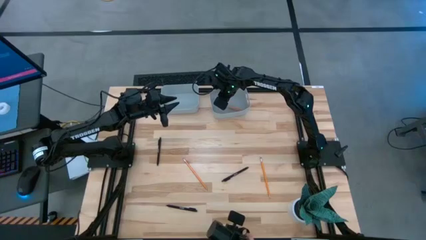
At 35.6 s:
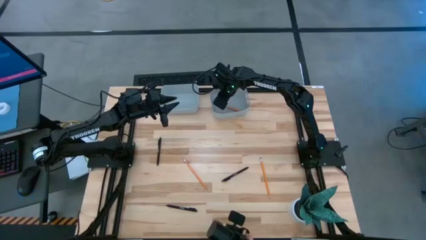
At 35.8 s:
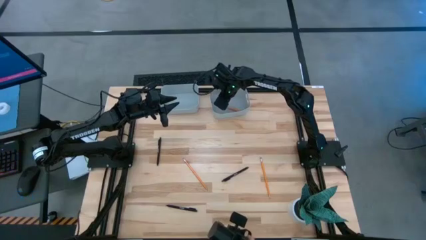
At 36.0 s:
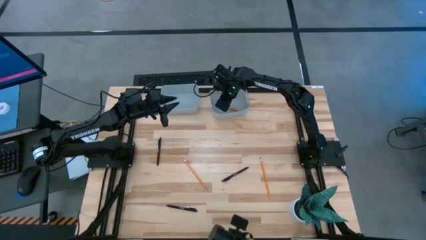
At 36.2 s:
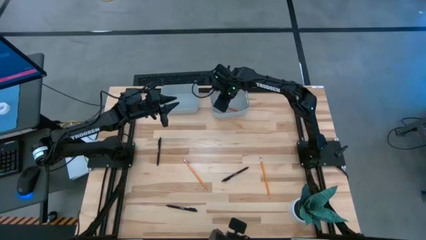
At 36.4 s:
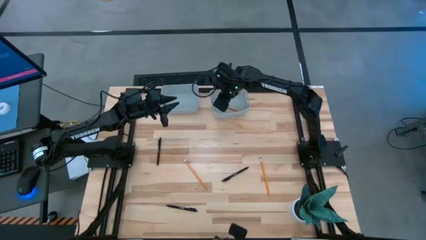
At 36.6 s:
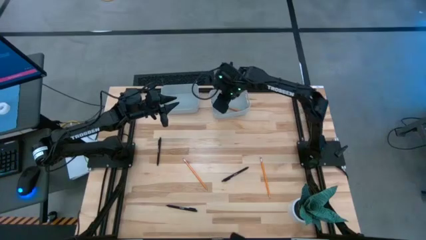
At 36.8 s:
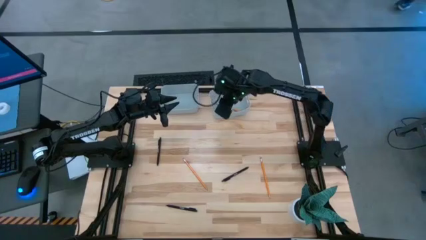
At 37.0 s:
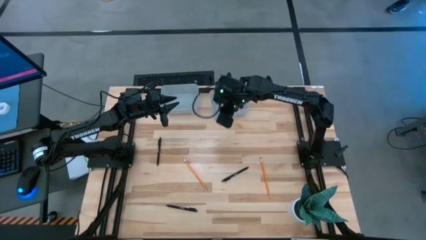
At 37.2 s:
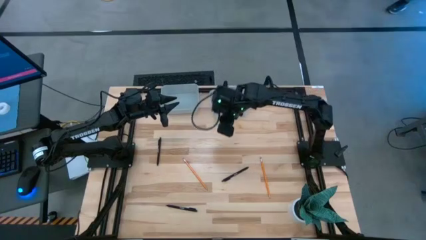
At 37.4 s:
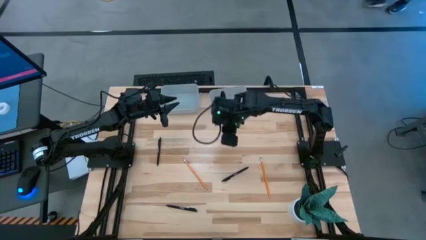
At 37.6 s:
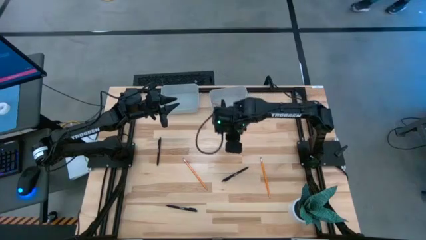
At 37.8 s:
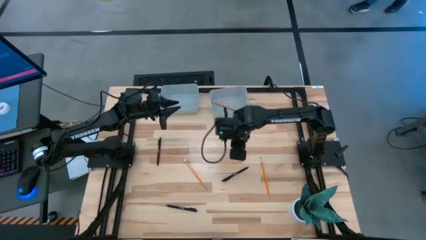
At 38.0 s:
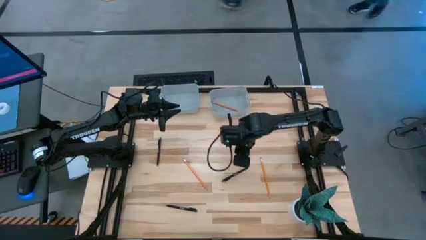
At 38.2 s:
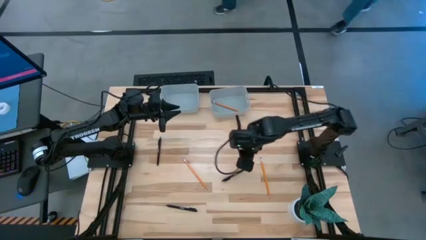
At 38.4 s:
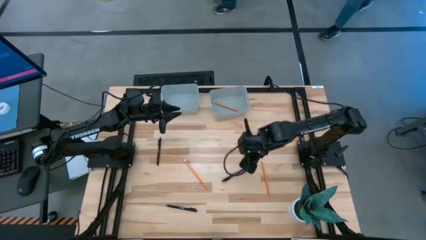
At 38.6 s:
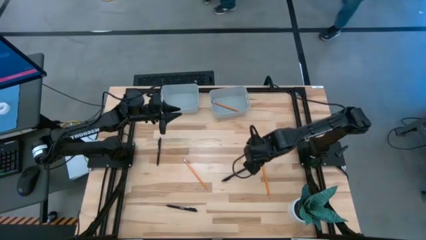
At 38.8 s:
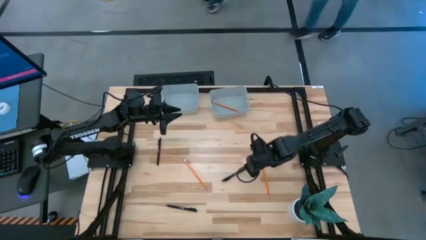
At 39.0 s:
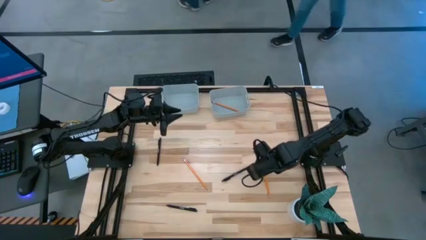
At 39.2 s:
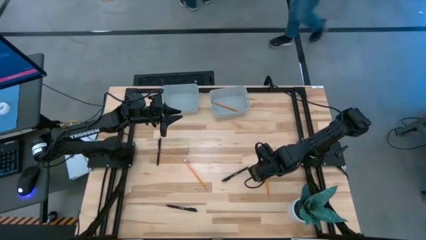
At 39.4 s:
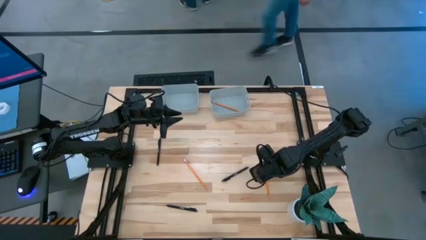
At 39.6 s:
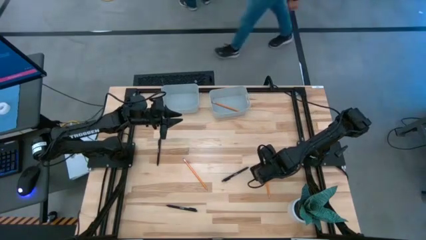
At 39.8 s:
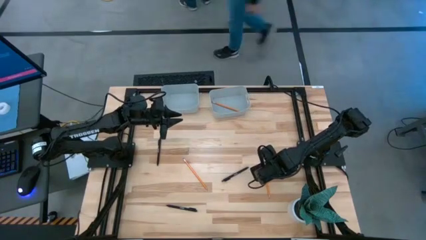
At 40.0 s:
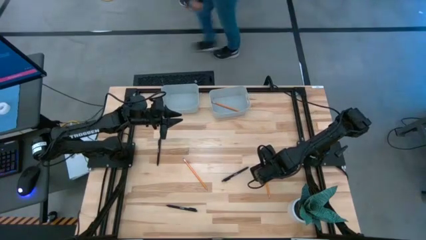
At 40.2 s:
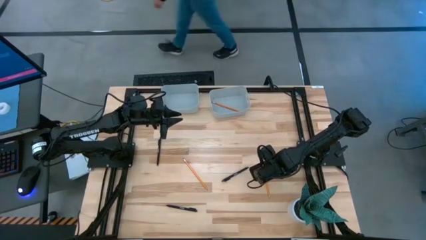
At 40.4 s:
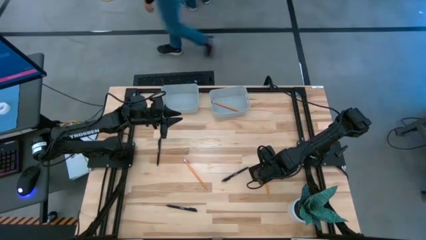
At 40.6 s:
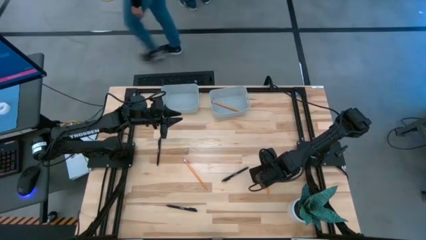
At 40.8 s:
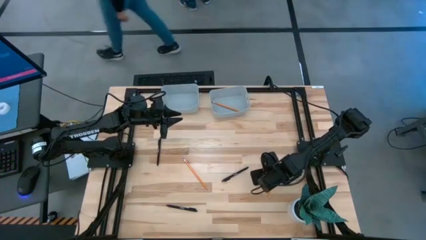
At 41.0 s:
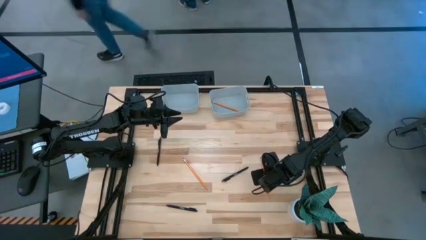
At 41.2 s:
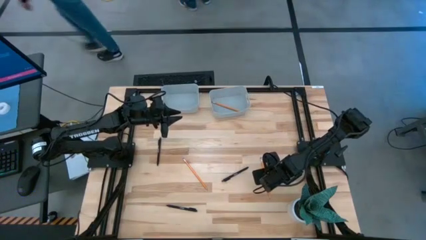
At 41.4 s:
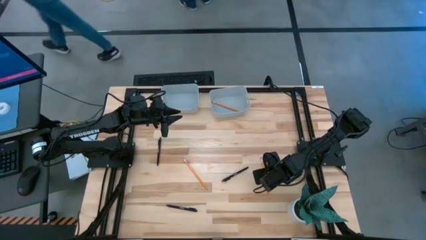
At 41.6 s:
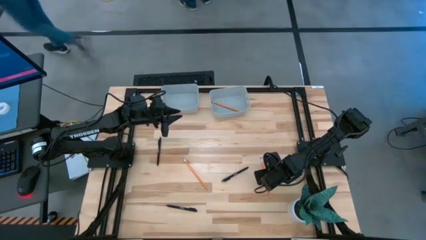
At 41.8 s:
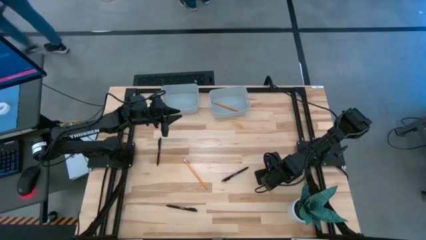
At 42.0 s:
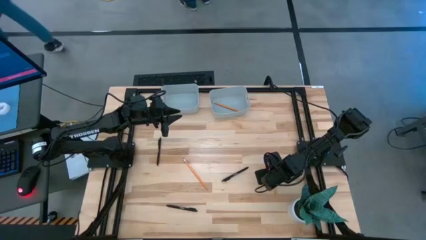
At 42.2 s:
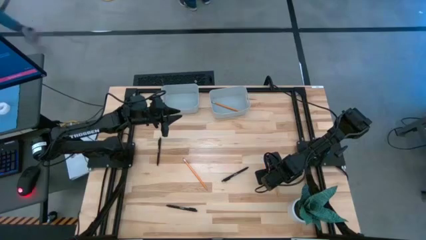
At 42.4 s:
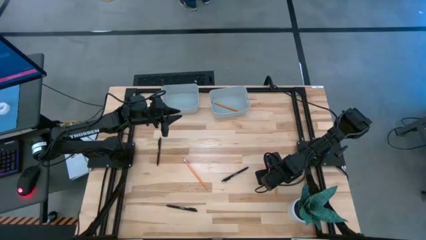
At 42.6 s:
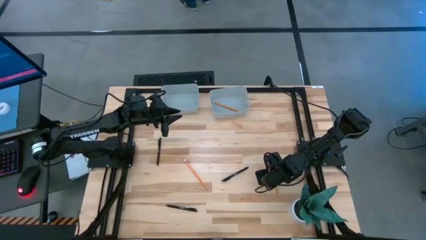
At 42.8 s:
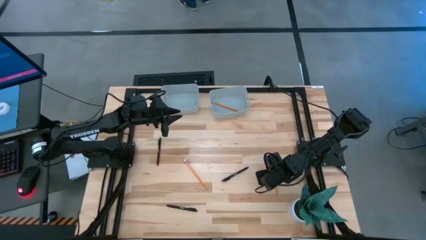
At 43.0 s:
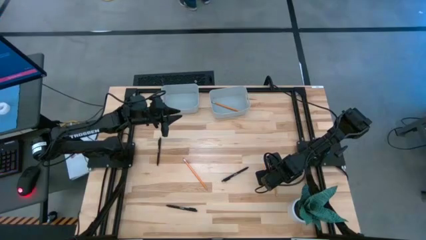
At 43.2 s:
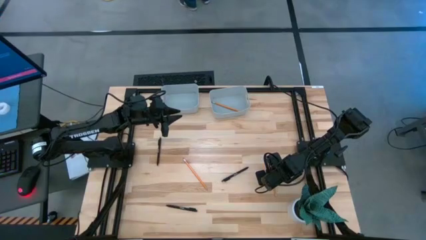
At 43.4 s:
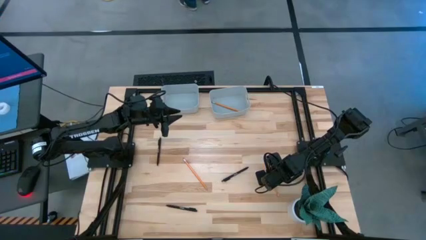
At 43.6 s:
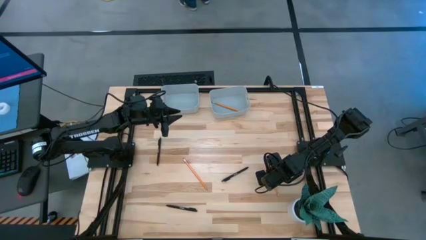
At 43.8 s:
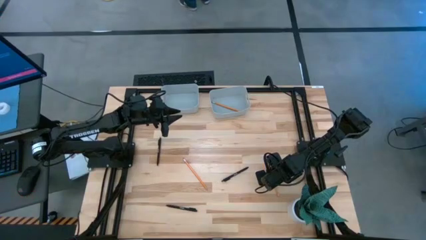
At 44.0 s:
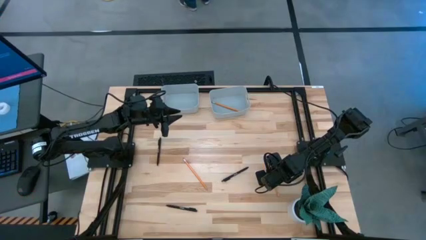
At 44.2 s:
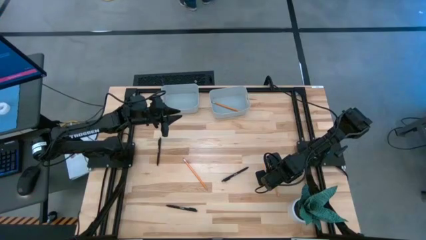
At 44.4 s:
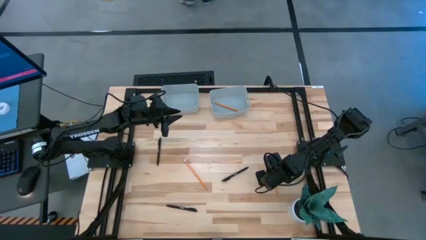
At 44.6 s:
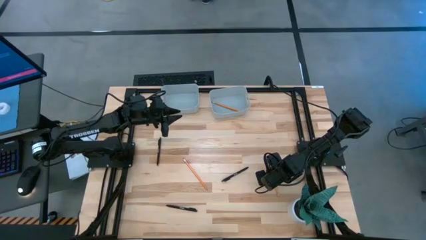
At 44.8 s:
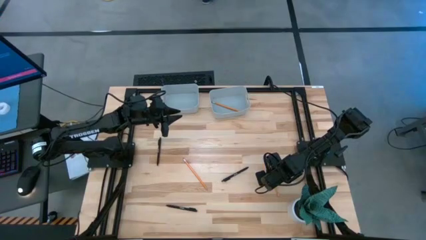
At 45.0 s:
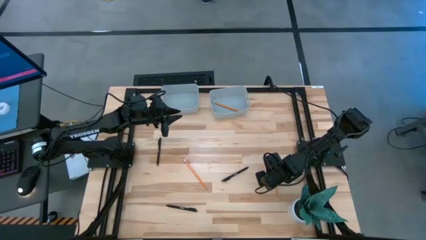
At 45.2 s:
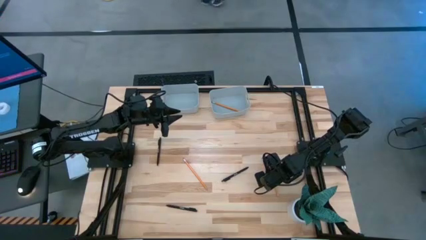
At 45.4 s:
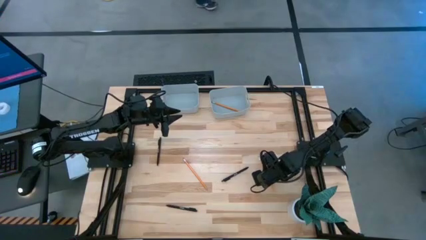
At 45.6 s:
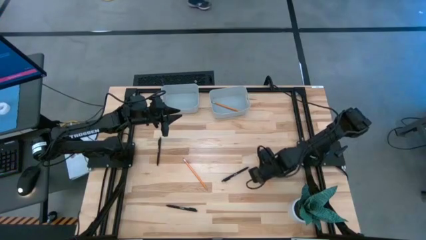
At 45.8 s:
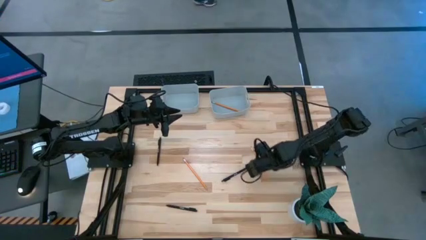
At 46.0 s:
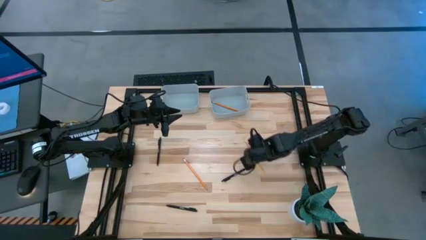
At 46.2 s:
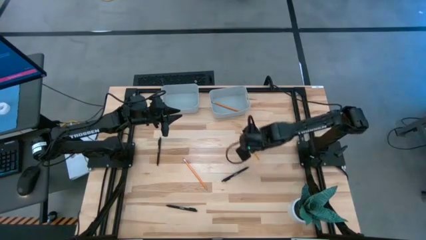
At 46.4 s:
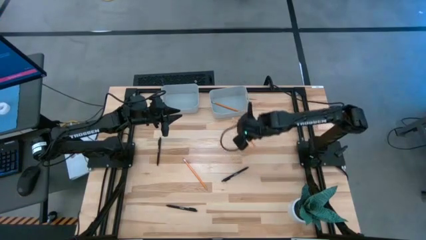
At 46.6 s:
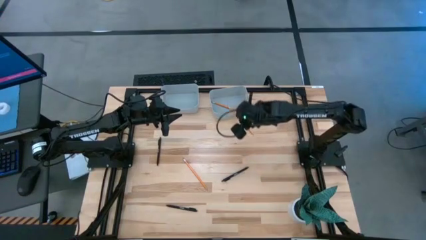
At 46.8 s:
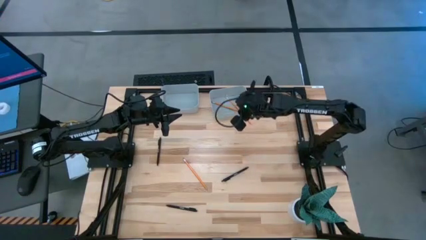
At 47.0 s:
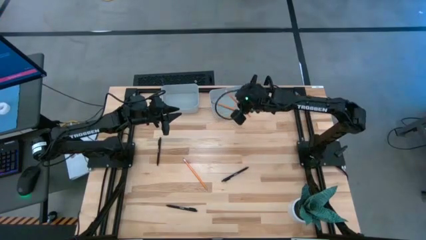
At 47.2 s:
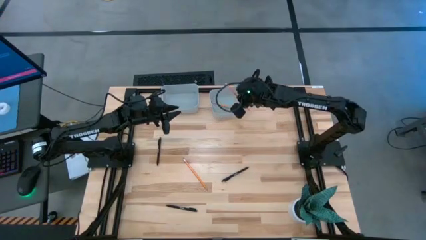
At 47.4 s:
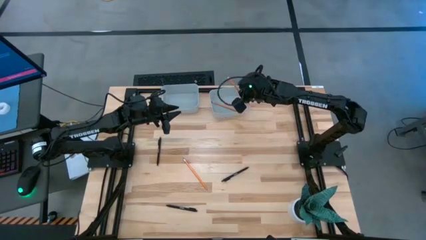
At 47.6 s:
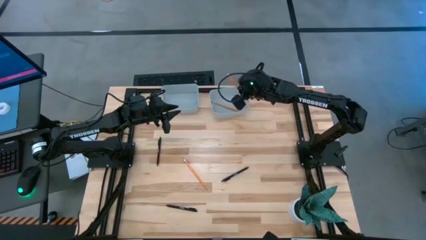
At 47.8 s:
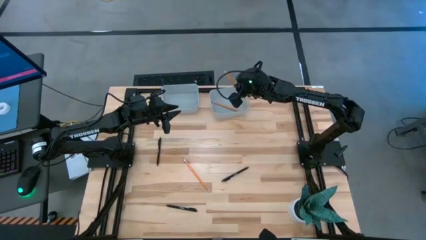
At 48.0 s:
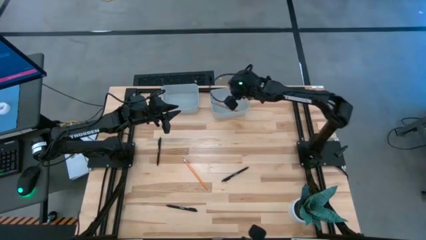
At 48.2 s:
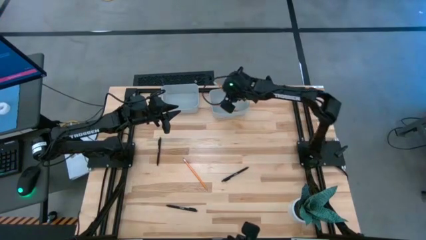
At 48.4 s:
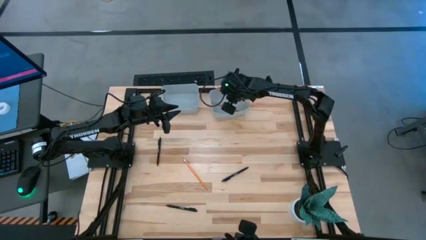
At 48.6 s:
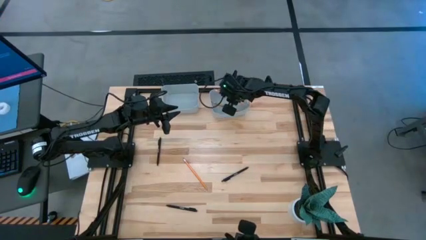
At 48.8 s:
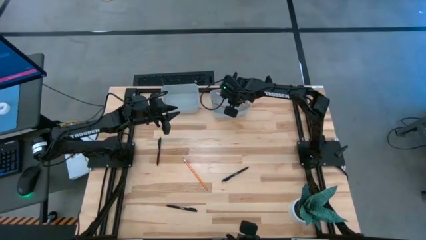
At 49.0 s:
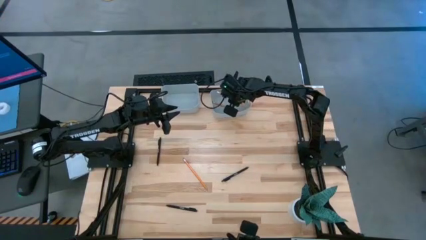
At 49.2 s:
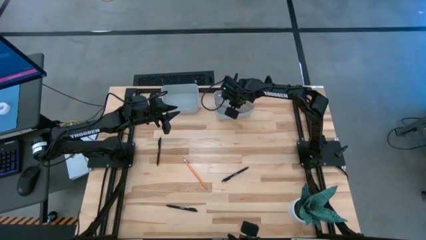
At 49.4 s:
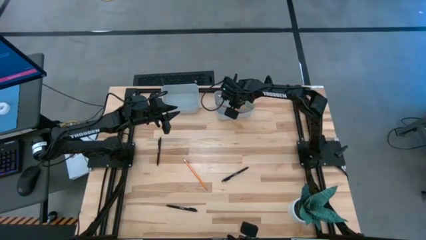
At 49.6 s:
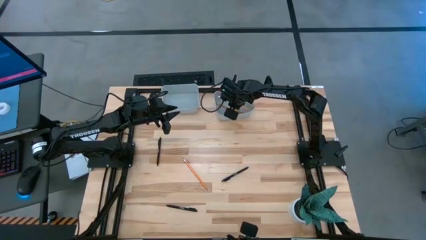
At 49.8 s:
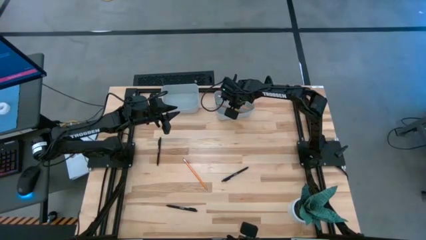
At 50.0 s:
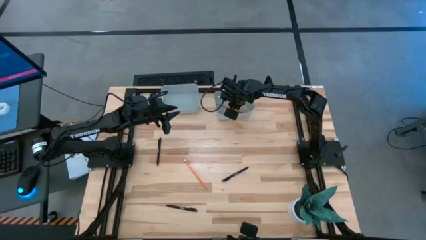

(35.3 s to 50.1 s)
Task: Sort pens & pencils
Put the right pencil into the right gray bin
